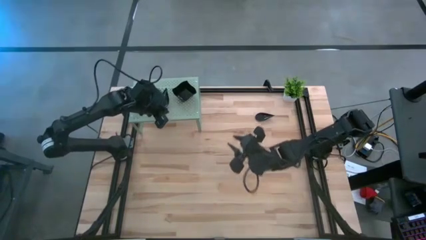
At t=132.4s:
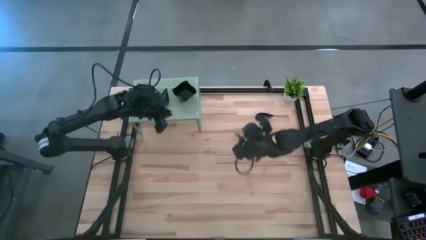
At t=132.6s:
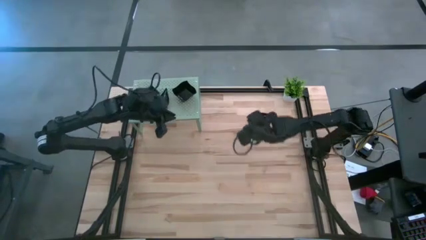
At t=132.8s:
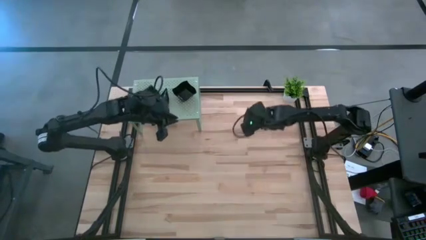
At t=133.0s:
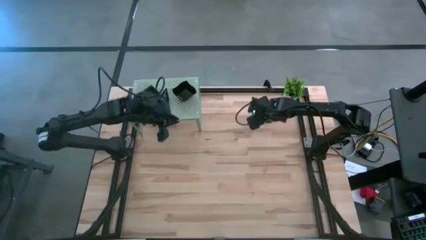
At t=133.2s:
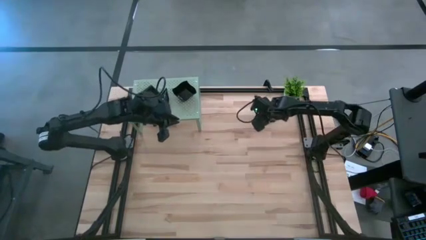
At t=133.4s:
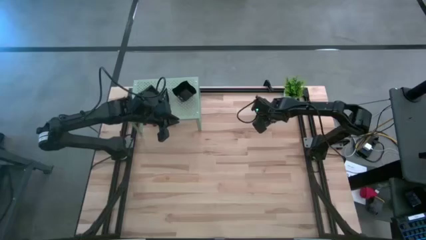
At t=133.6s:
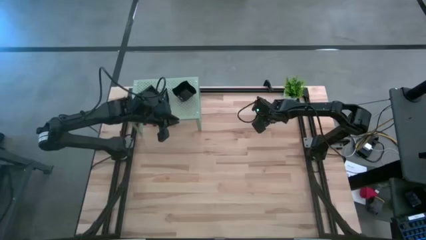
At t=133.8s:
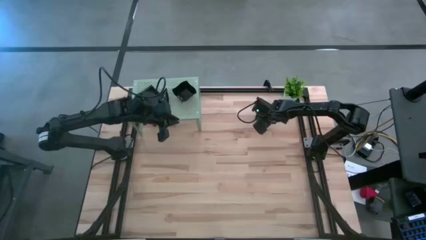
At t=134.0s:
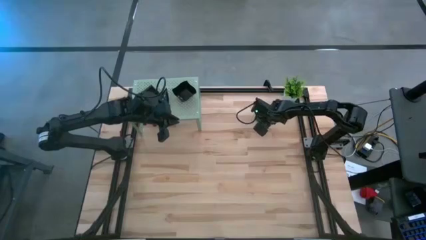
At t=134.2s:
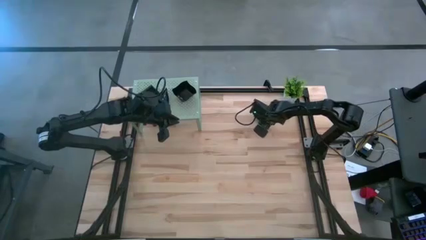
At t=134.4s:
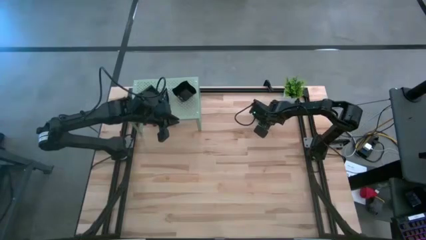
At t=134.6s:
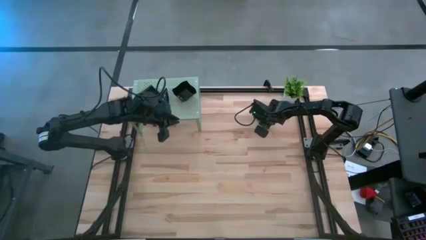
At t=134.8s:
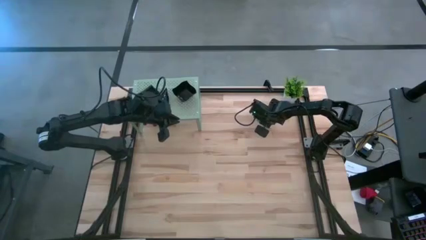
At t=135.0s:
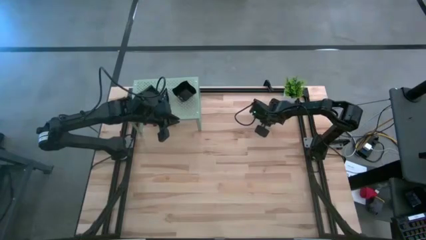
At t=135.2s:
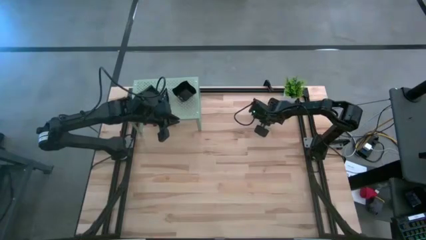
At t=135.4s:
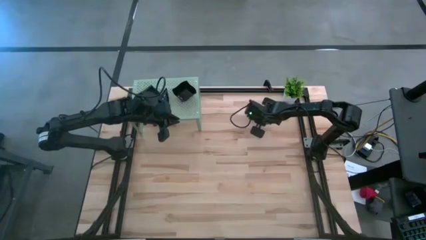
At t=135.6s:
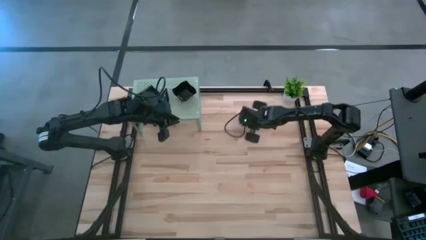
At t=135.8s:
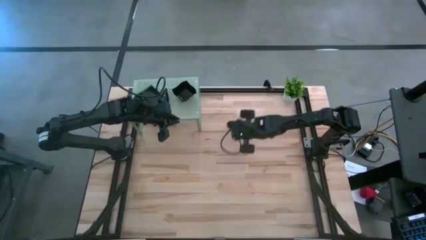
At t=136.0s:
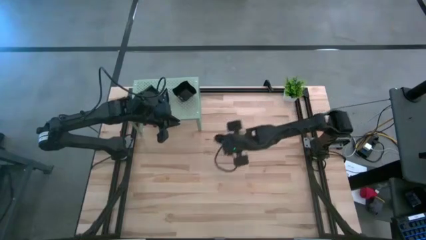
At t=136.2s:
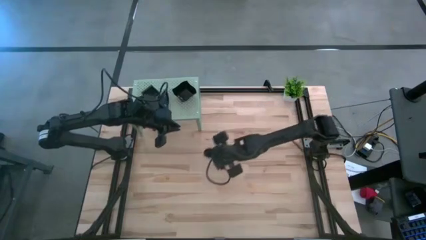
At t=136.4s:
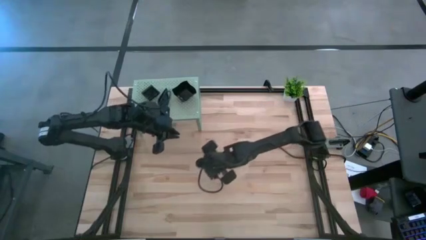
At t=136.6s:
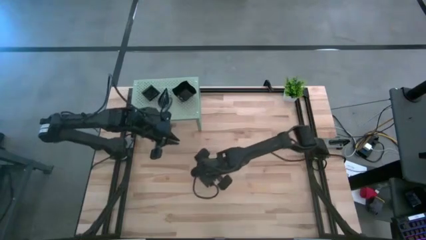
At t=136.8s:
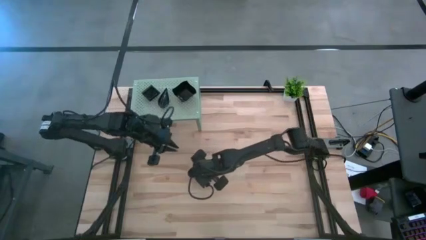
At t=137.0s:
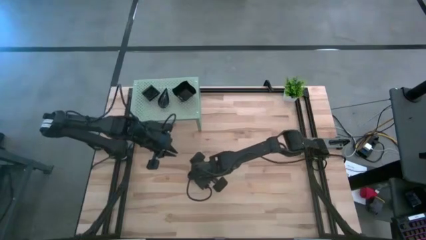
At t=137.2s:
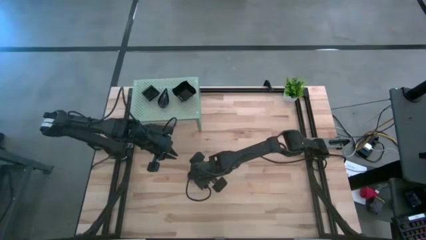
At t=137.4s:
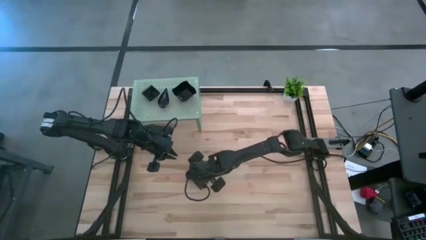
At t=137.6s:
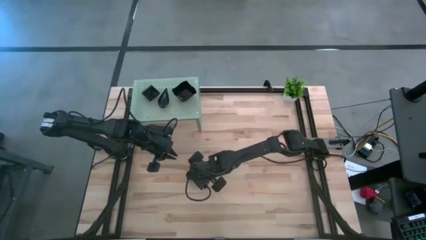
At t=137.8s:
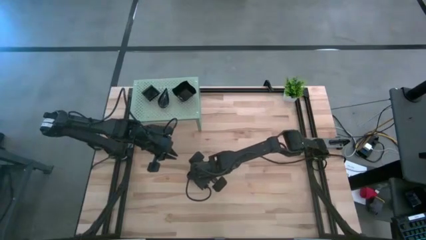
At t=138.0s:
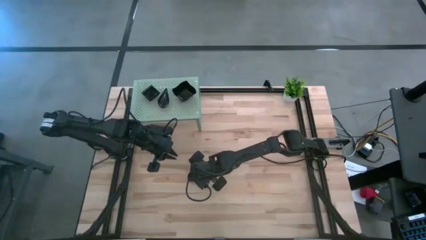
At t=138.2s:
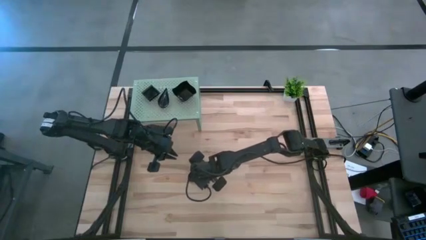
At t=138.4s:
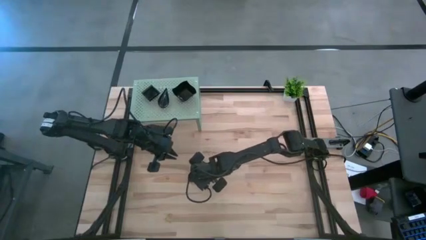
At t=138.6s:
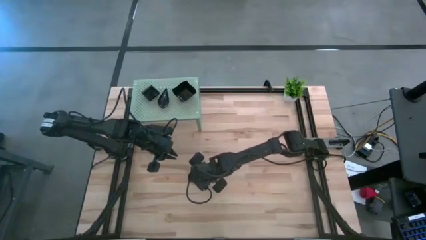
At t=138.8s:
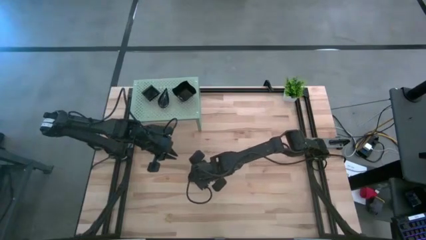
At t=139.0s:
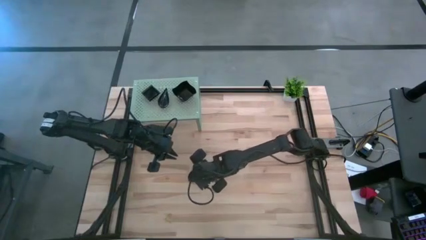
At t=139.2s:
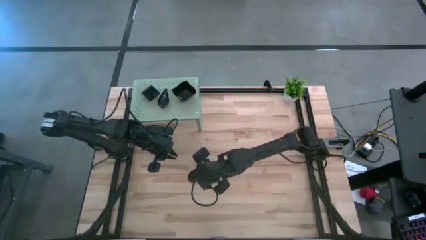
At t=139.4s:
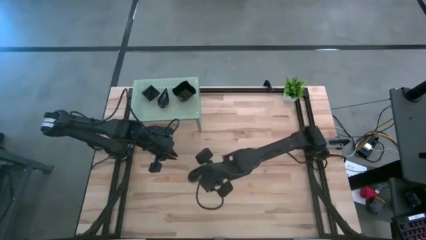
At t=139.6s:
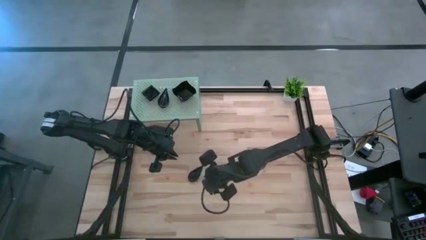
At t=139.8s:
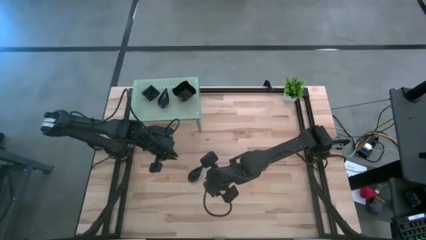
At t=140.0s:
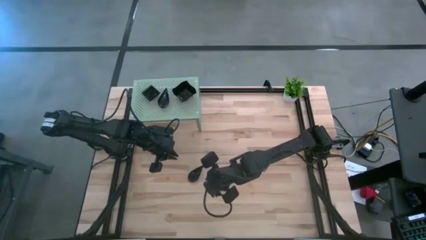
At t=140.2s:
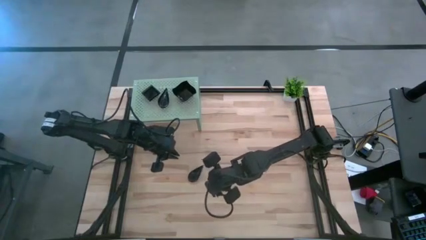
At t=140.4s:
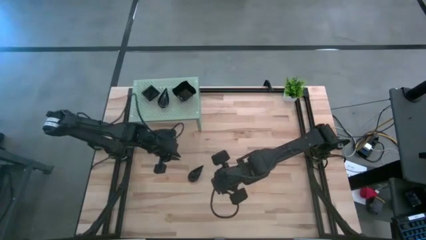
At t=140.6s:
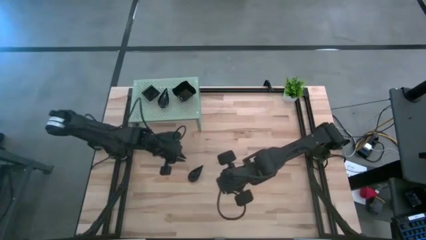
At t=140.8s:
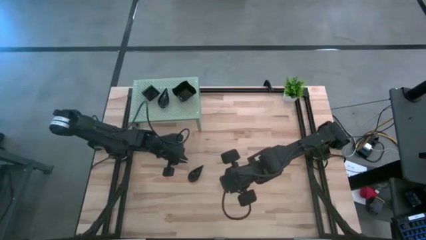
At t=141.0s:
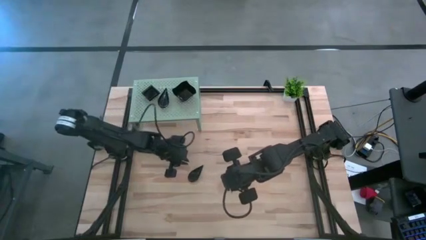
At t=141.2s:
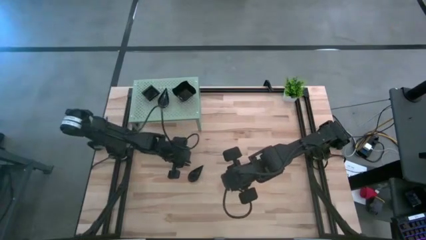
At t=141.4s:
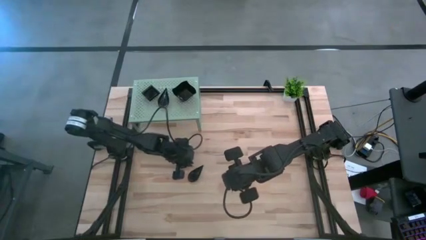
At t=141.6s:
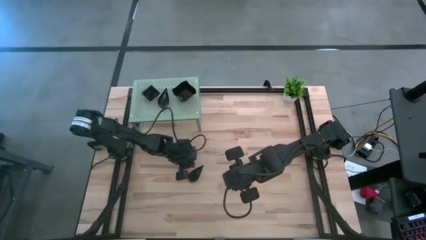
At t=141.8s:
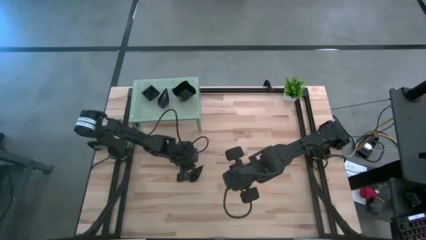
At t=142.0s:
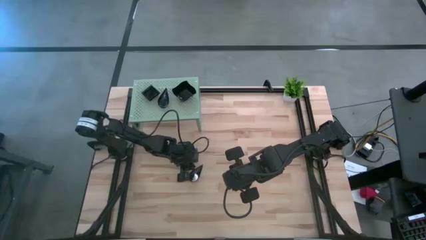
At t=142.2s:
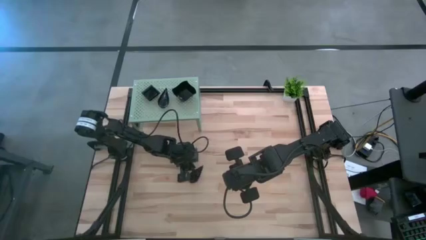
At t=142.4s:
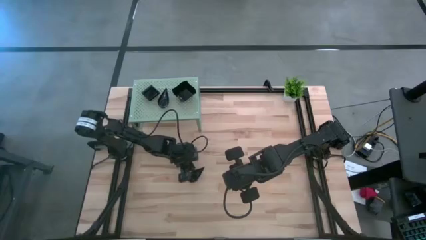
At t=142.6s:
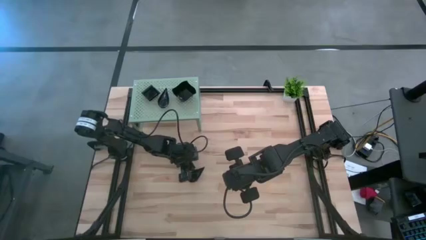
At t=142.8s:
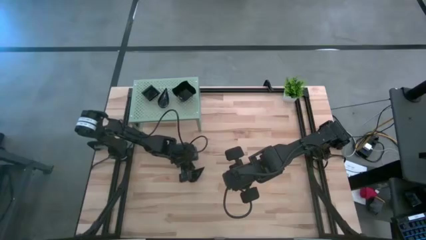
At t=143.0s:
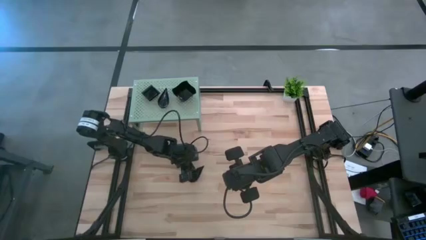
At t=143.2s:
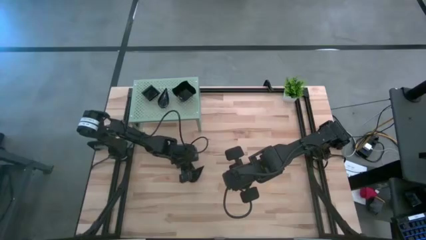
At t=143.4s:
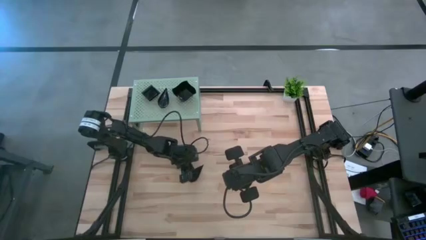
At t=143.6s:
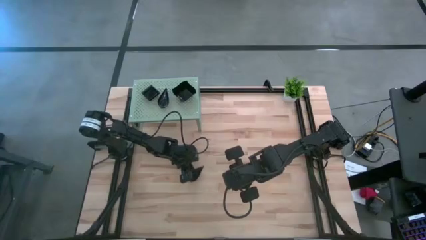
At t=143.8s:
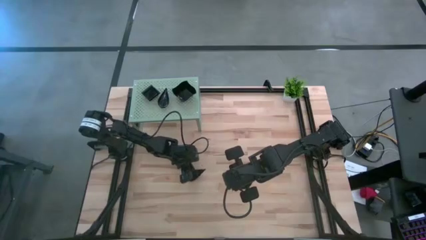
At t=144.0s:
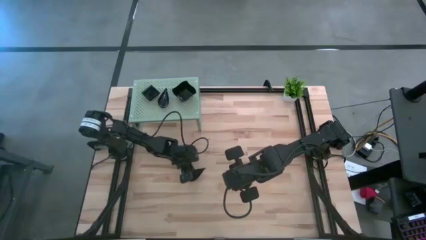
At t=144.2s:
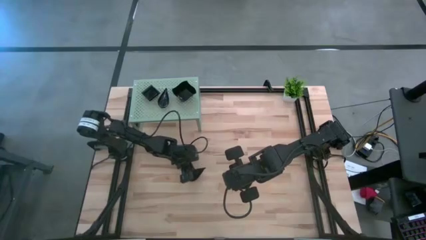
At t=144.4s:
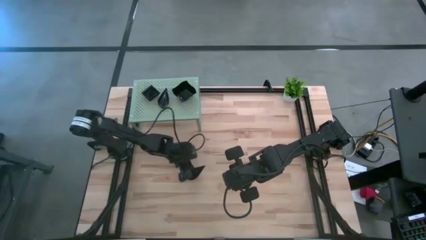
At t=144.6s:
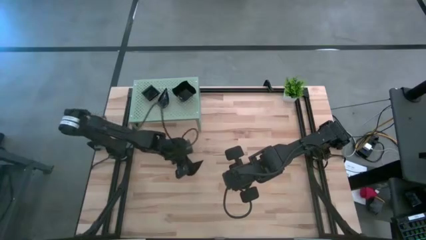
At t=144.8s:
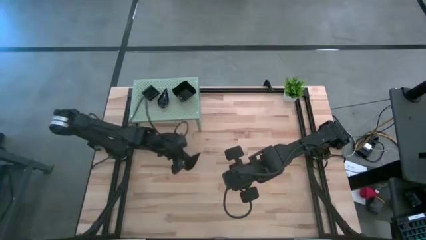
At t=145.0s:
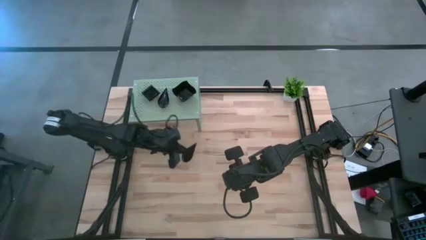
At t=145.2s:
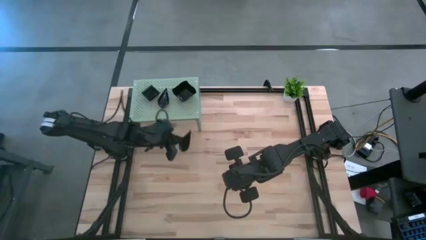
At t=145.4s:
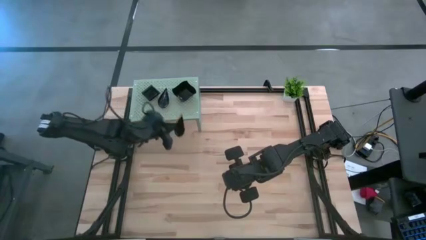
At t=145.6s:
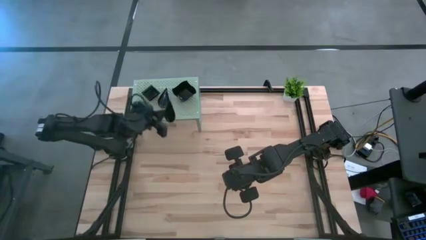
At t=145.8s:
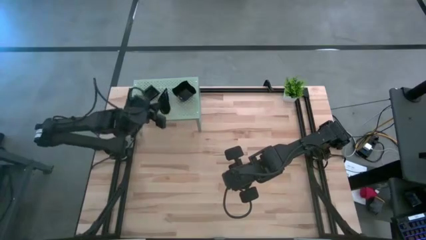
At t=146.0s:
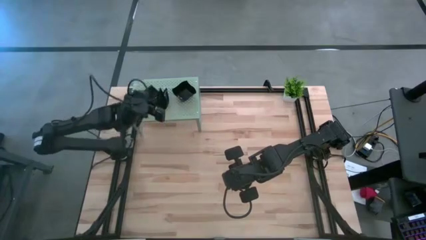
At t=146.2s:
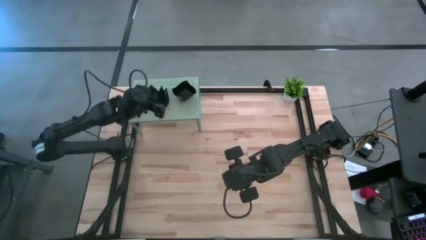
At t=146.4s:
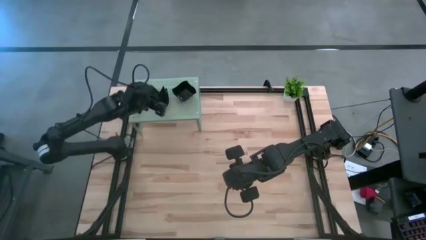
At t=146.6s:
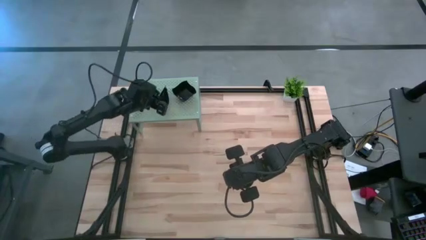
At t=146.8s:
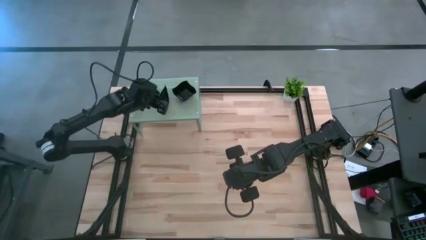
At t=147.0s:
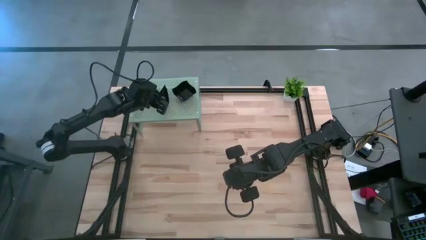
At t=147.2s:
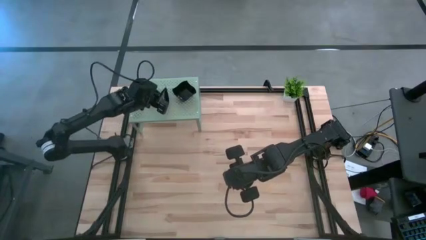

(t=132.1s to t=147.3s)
Task: Pick & Place Mini shaped plates
Stack the black drop-shaped plate on top of the black drop-shaped plate on the shelf
